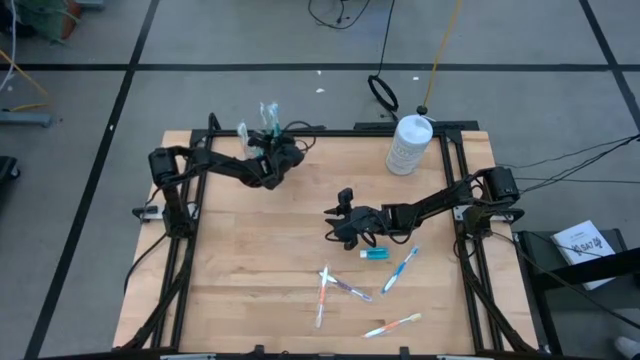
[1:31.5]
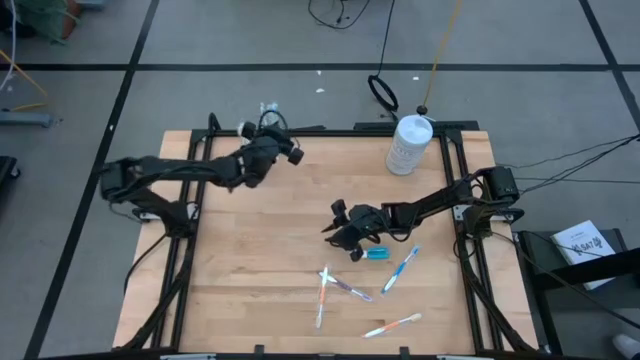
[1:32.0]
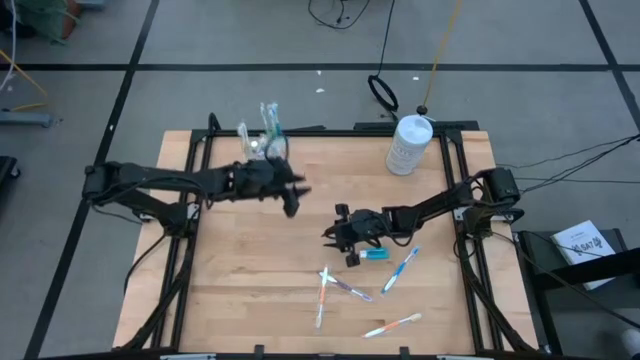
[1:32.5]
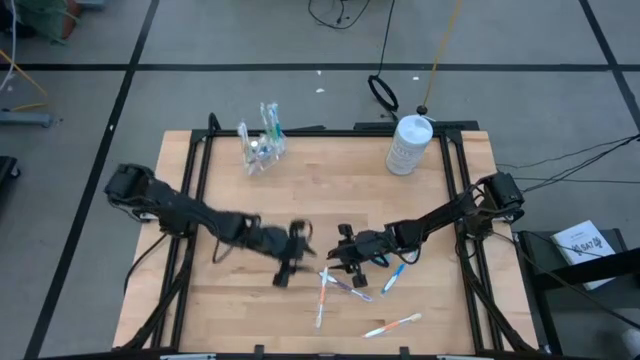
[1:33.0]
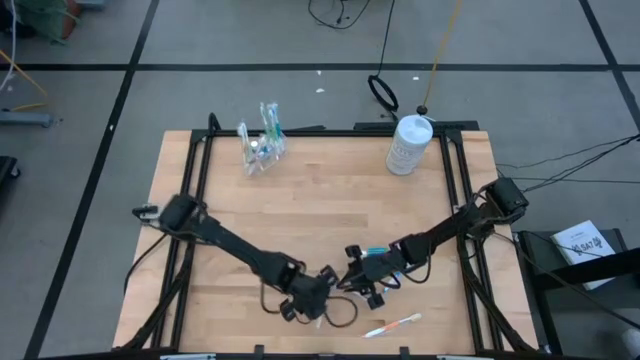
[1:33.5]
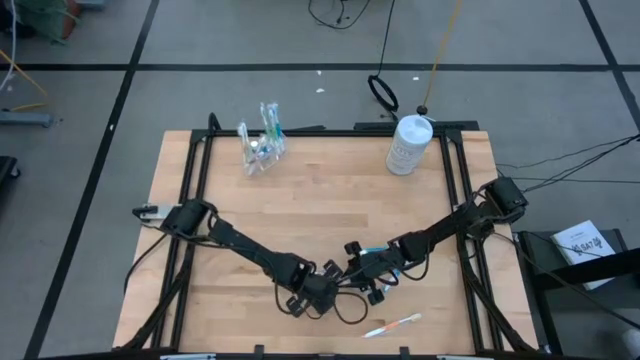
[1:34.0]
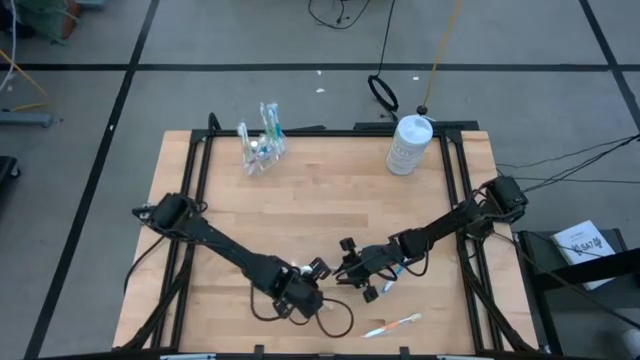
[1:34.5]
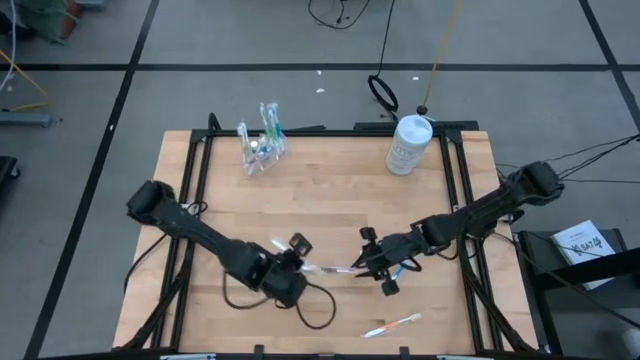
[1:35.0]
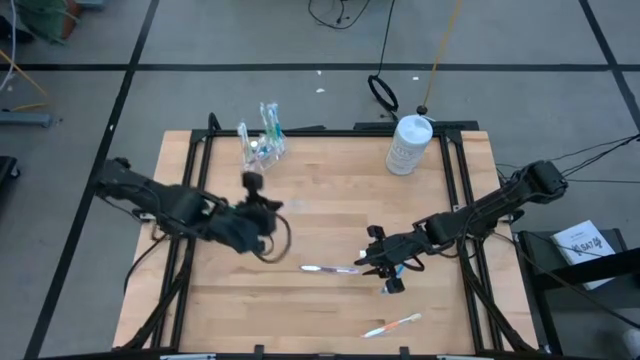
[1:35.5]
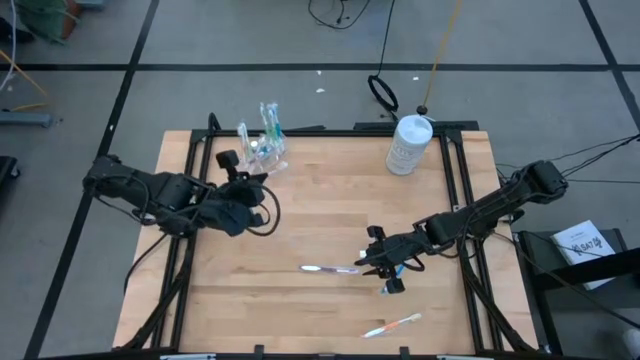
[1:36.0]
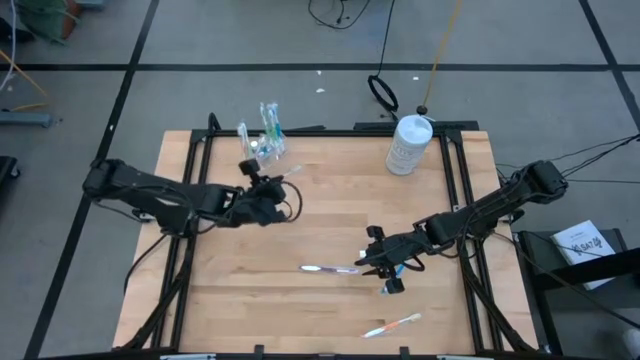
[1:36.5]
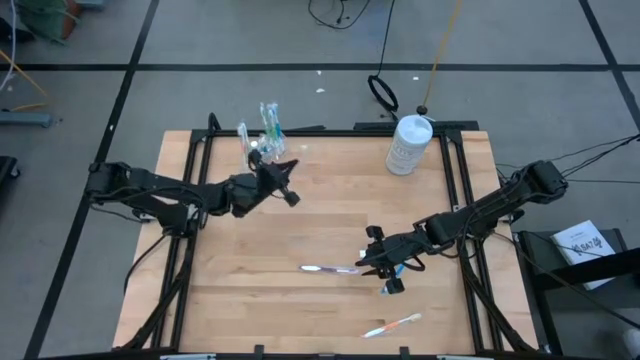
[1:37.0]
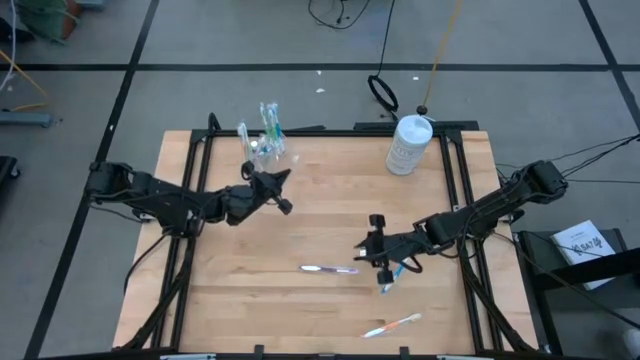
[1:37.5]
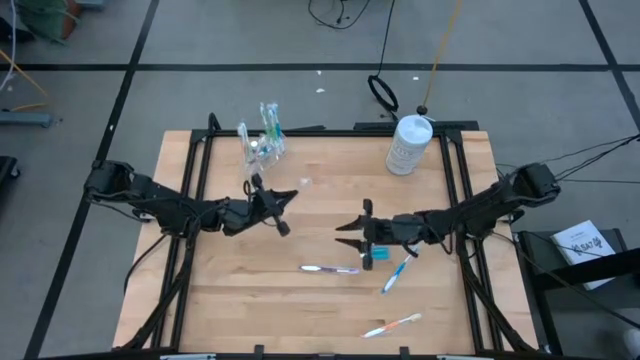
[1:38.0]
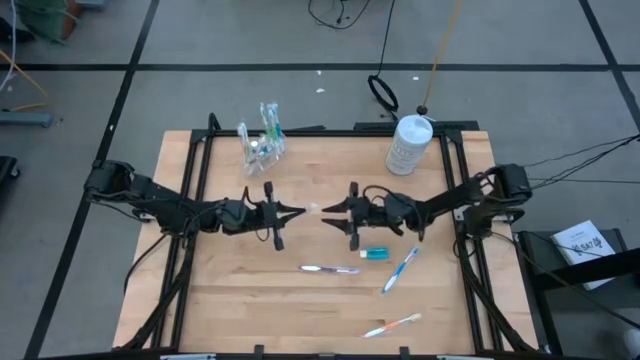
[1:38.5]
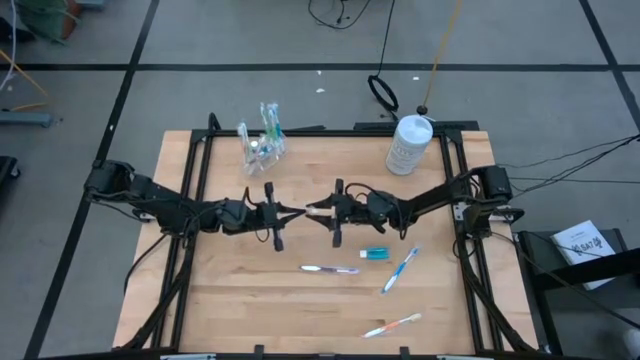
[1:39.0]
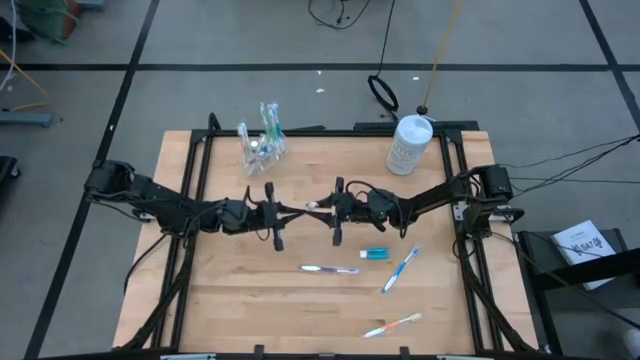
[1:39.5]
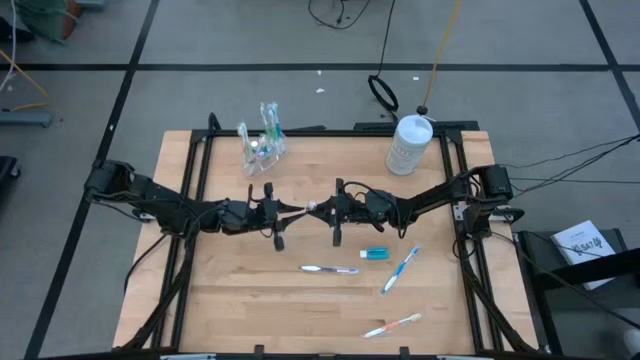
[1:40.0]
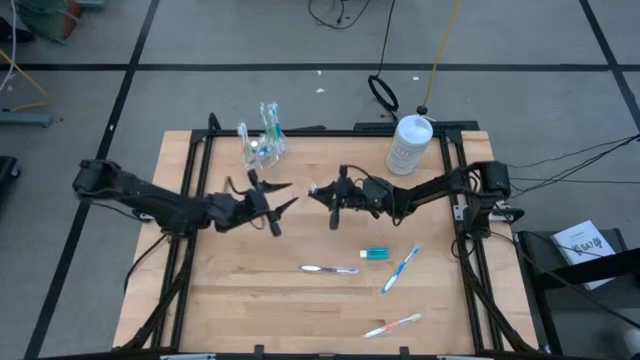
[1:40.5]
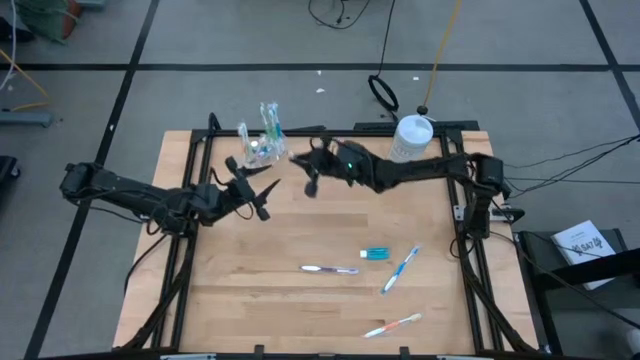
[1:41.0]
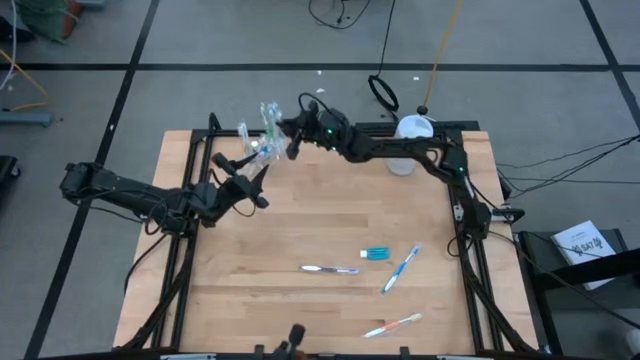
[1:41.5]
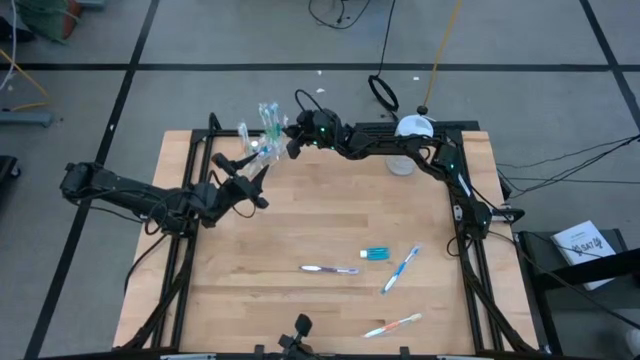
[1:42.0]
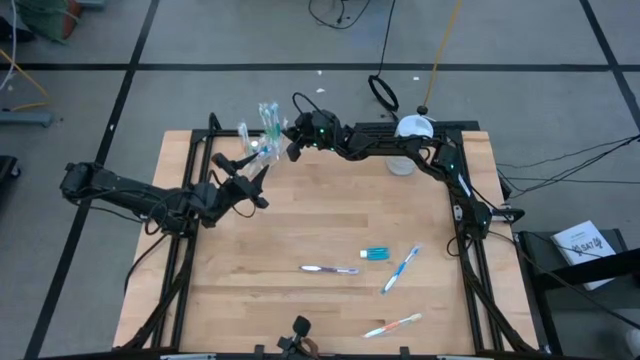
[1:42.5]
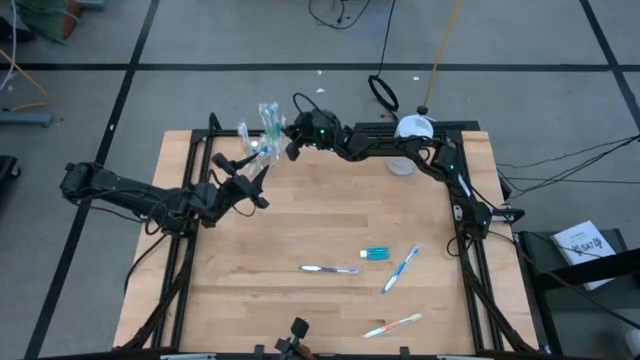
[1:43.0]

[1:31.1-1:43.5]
Task: Pick & Place toothbrushing station
Put the orange toothbrush into the transparent organizer

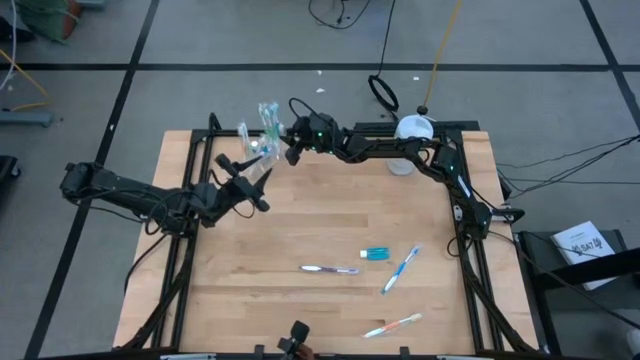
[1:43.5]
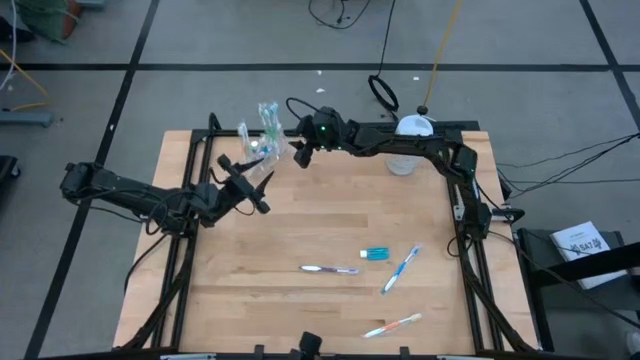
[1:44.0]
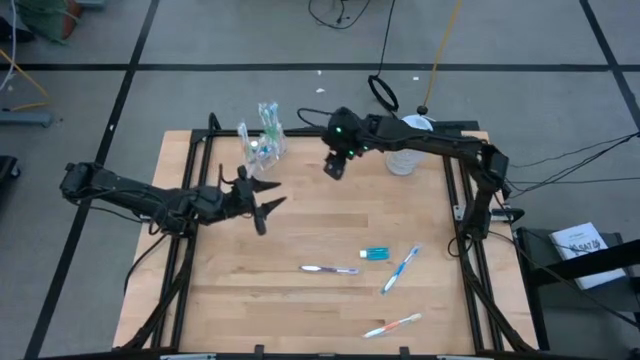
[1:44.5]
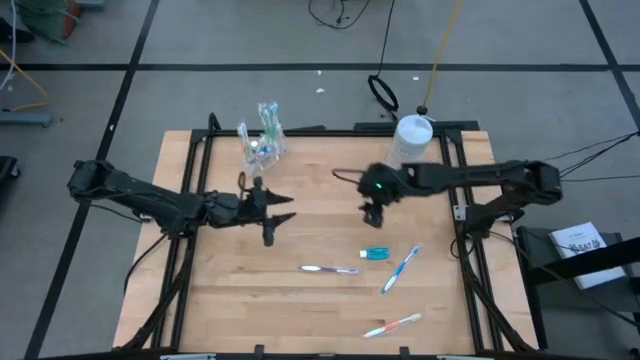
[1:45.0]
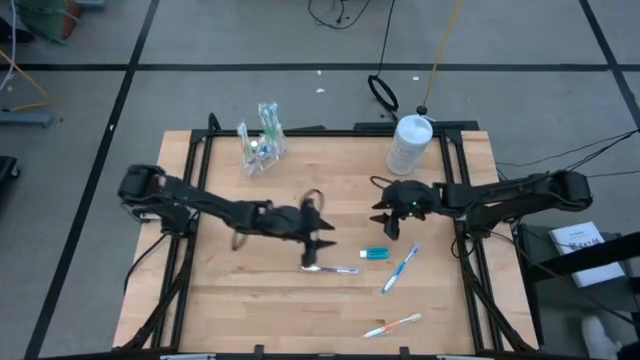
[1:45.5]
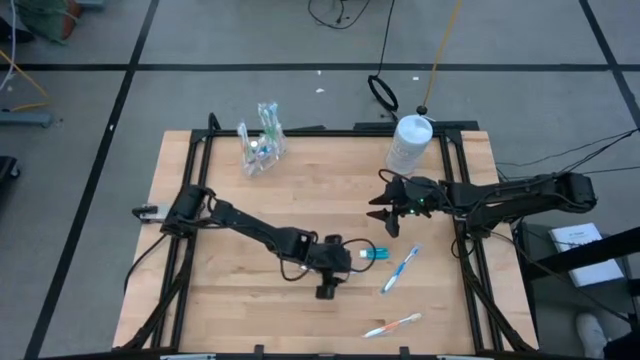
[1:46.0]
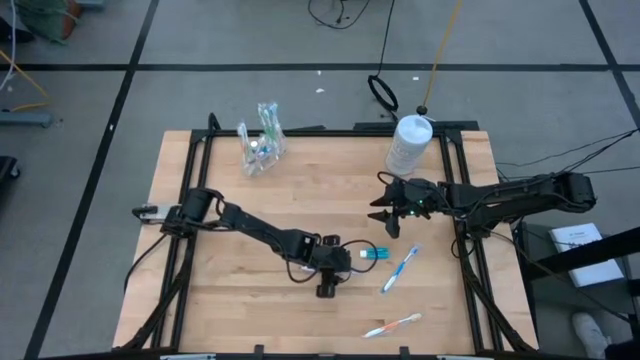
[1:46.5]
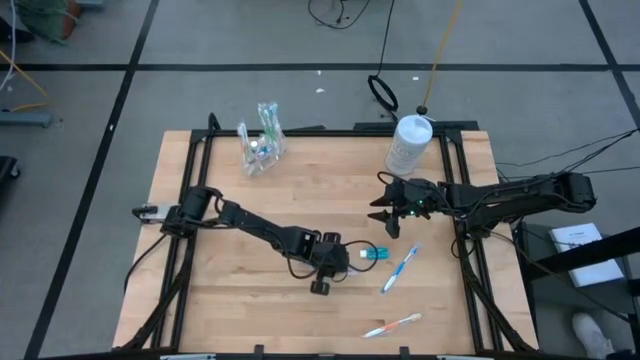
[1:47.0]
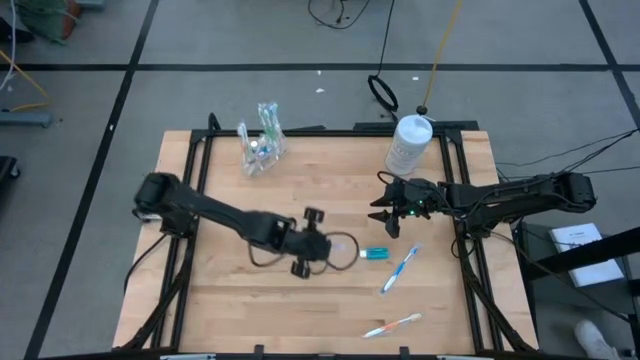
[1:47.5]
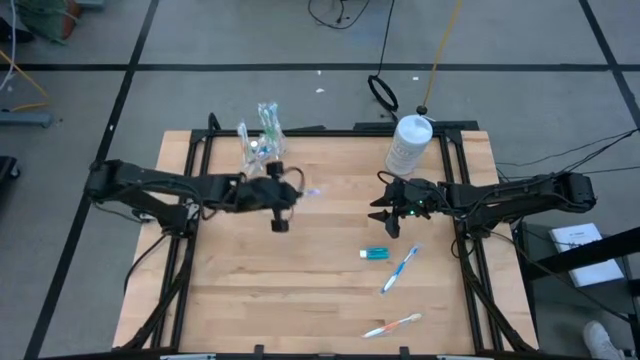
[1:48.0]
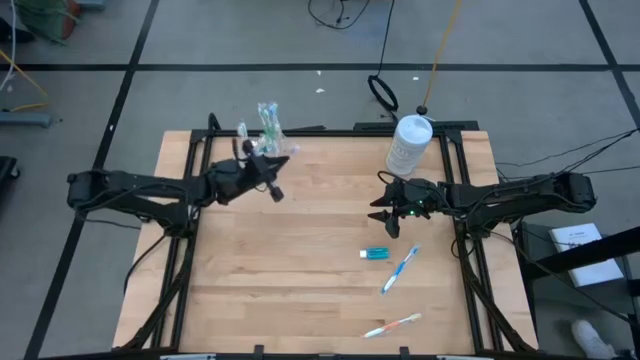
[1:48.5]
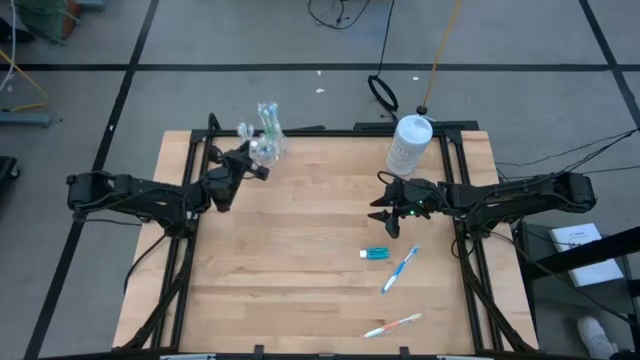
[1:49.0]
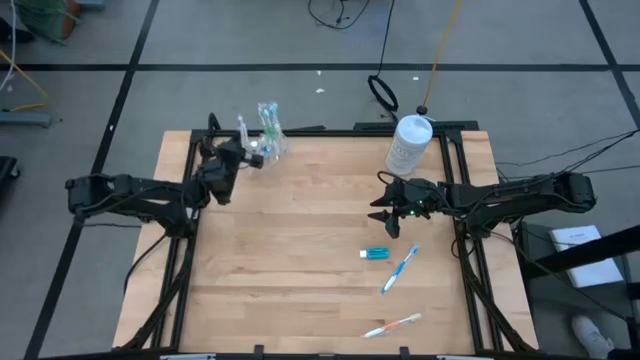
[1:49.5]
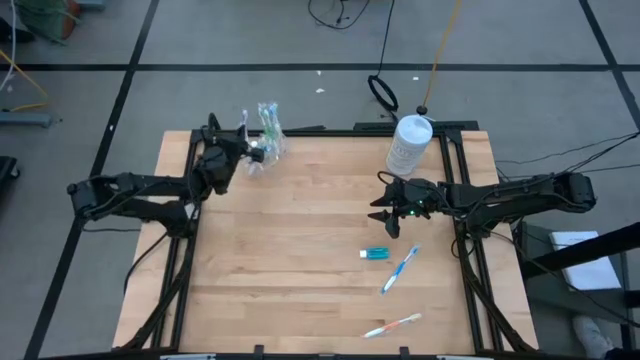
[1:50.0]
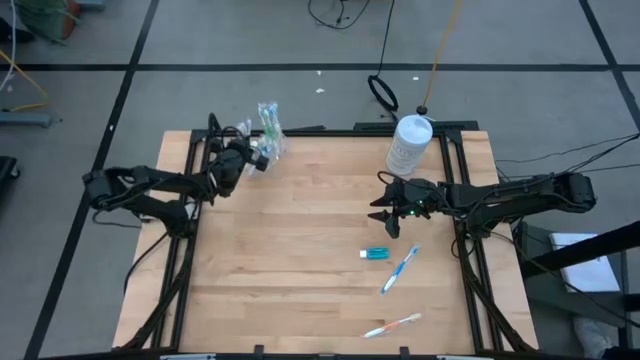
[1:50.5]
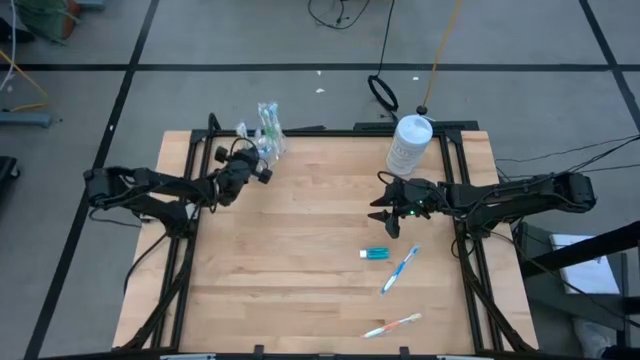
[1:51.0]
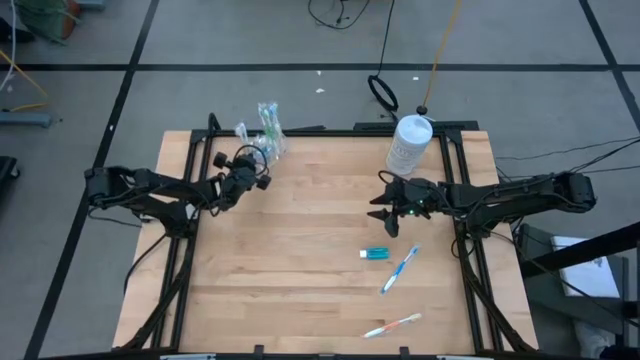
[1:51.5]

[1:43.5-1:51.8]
Put the purple toothbrush into the transparent organizer
